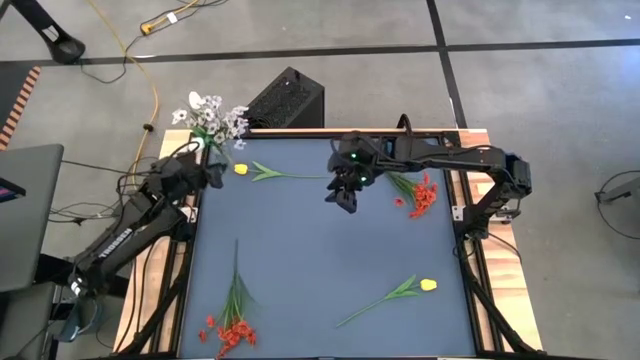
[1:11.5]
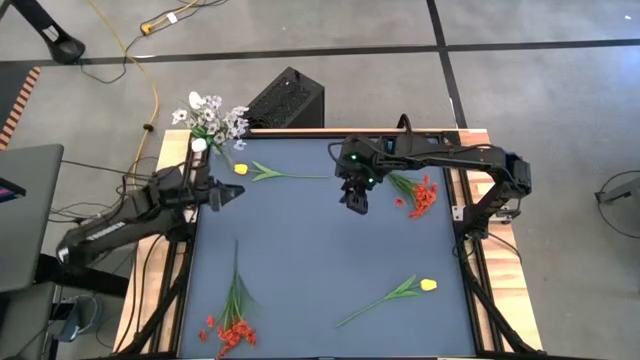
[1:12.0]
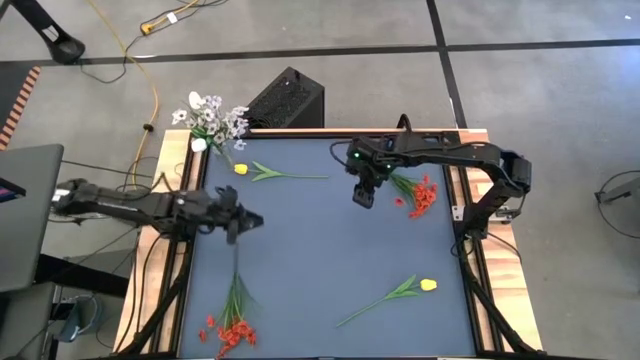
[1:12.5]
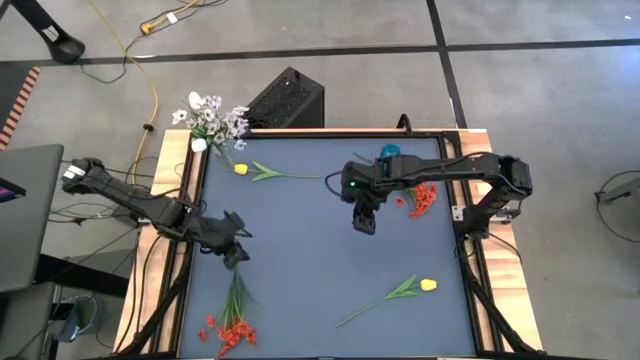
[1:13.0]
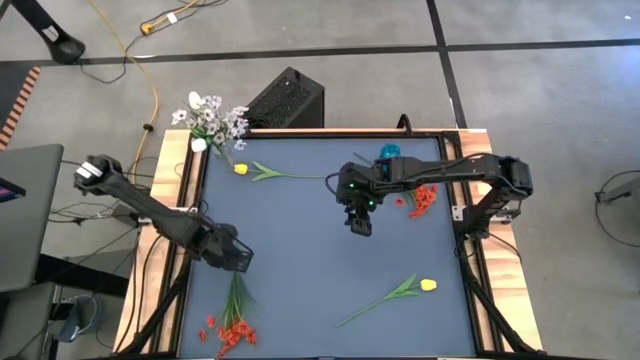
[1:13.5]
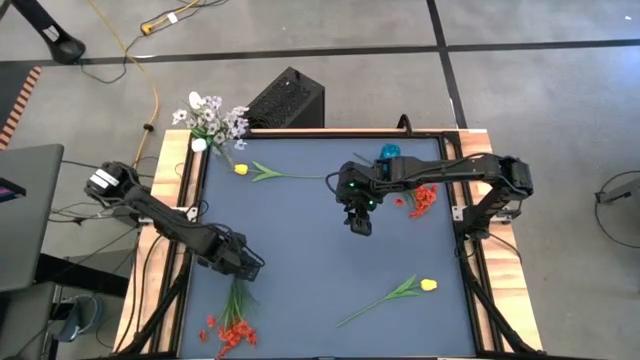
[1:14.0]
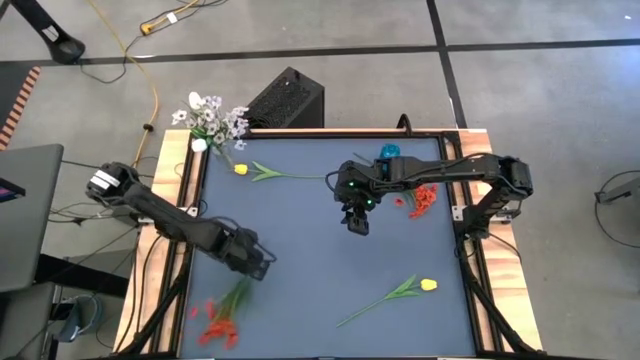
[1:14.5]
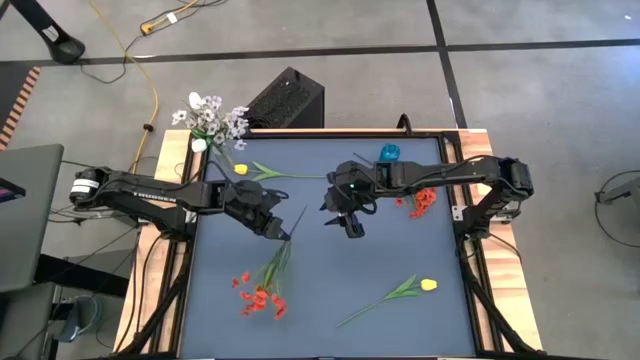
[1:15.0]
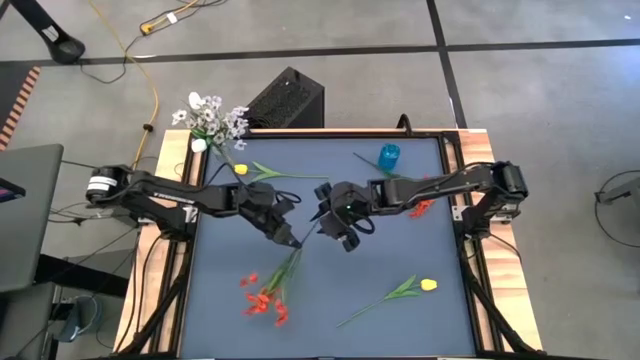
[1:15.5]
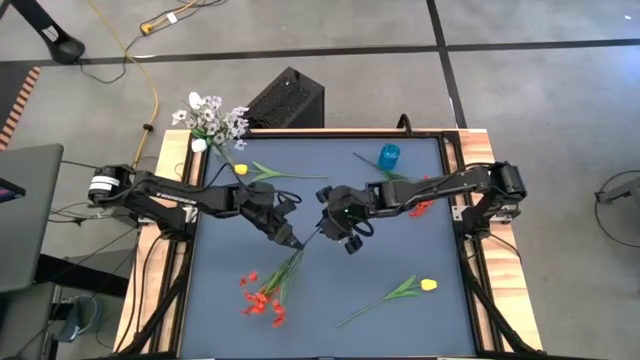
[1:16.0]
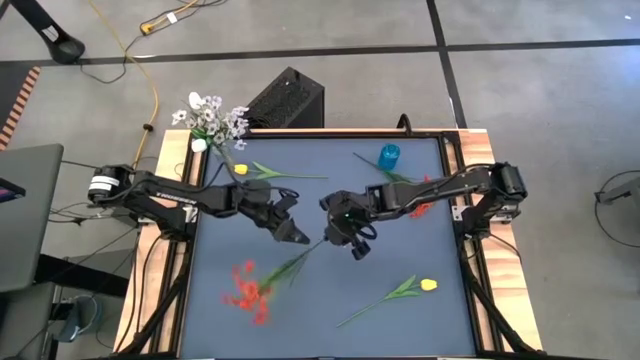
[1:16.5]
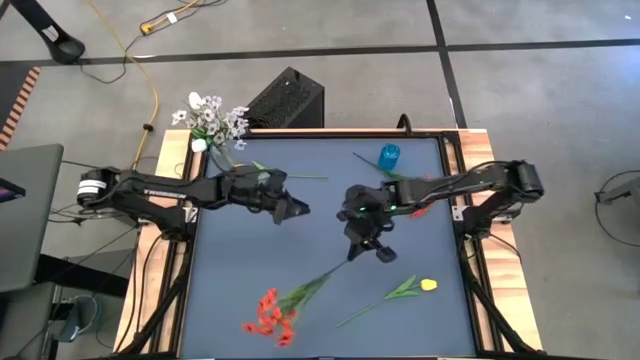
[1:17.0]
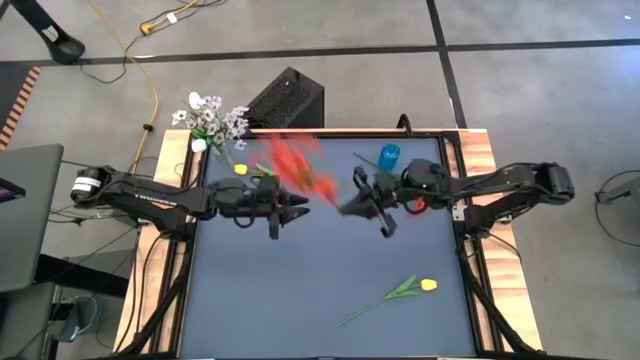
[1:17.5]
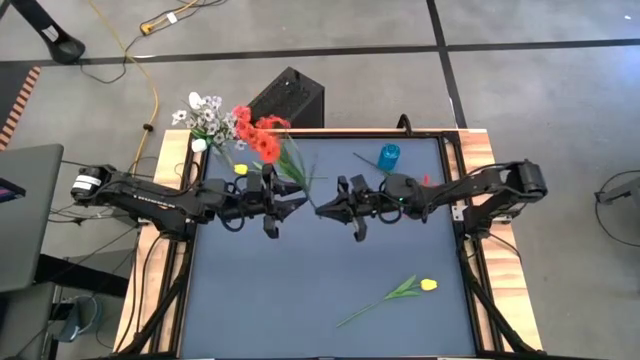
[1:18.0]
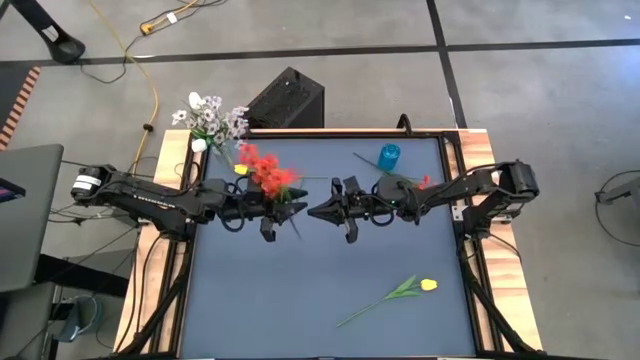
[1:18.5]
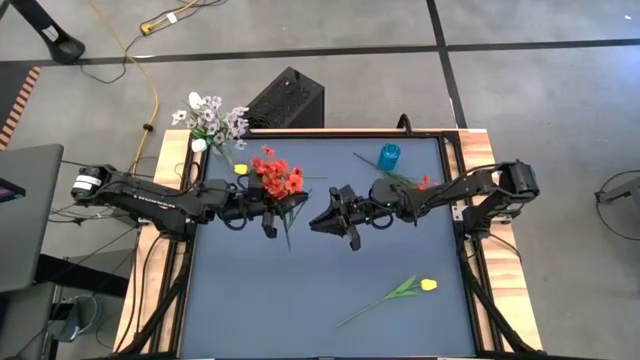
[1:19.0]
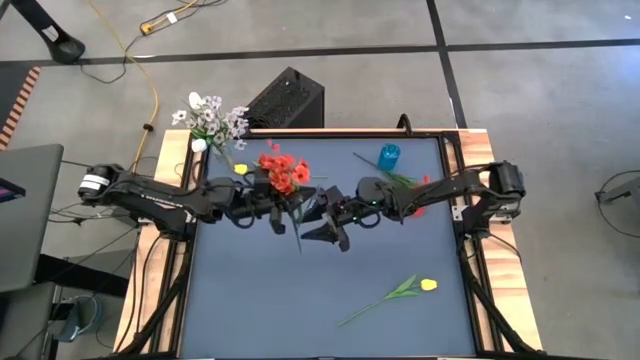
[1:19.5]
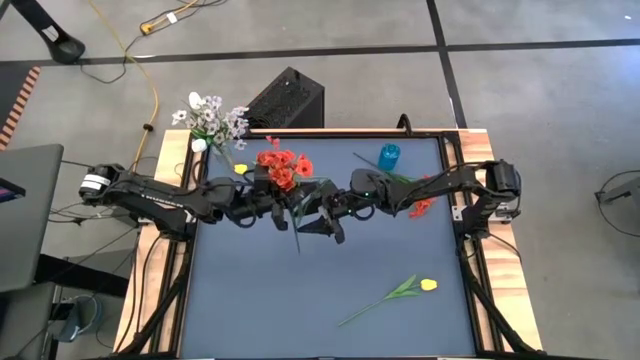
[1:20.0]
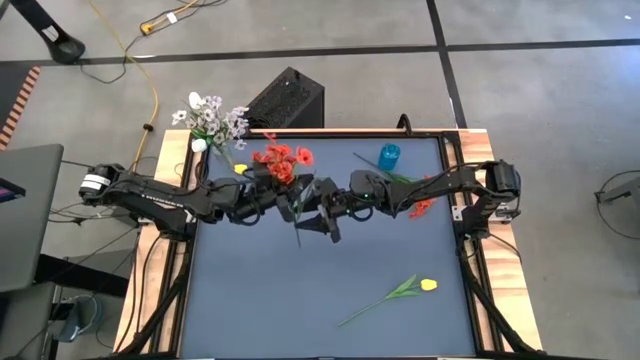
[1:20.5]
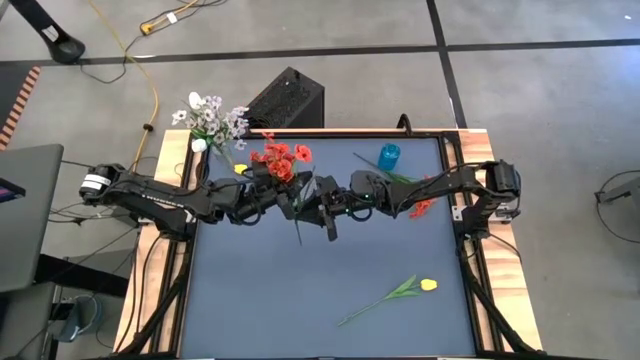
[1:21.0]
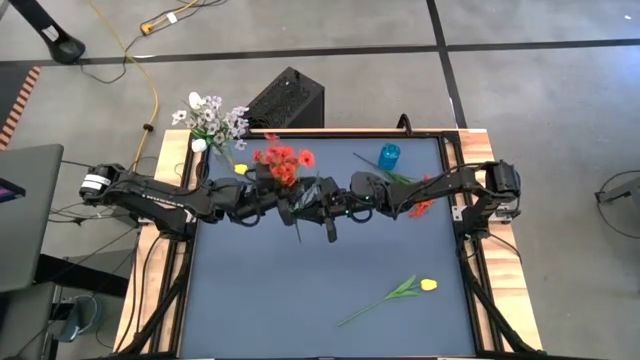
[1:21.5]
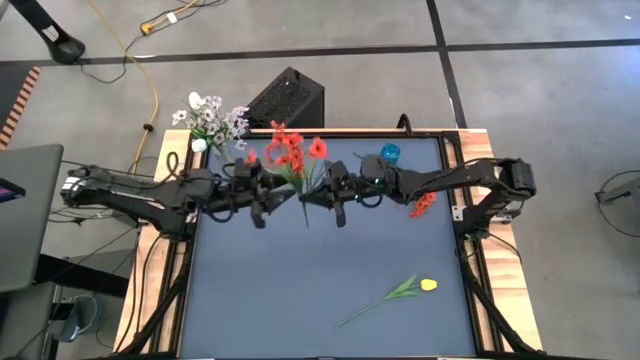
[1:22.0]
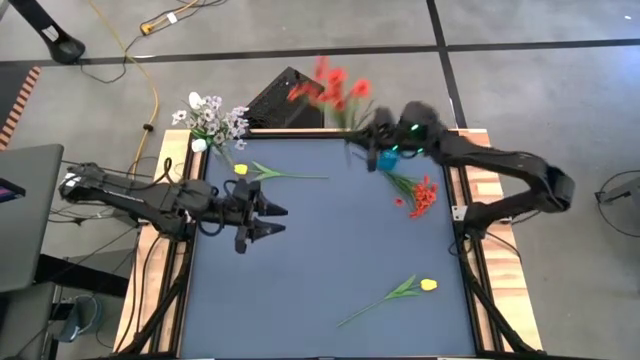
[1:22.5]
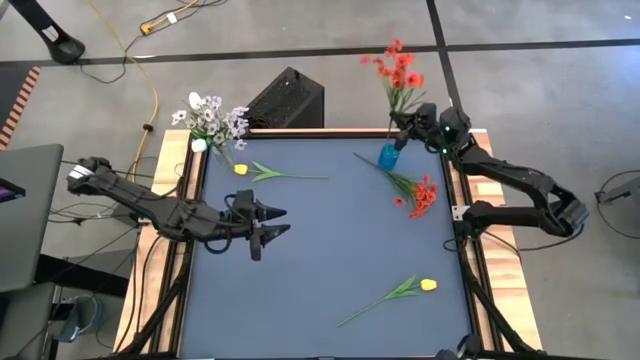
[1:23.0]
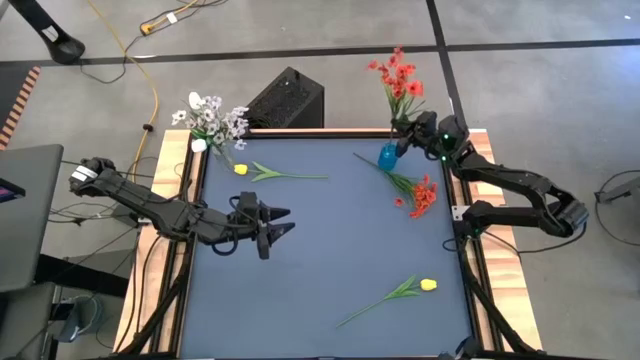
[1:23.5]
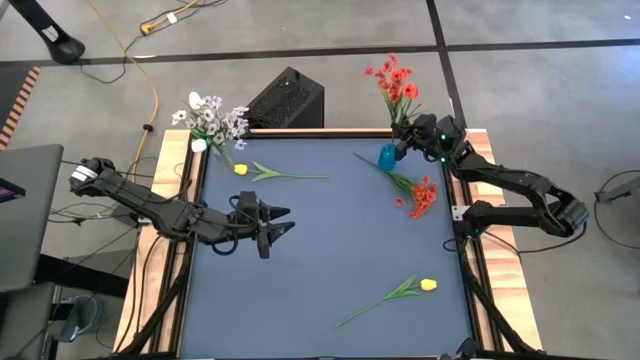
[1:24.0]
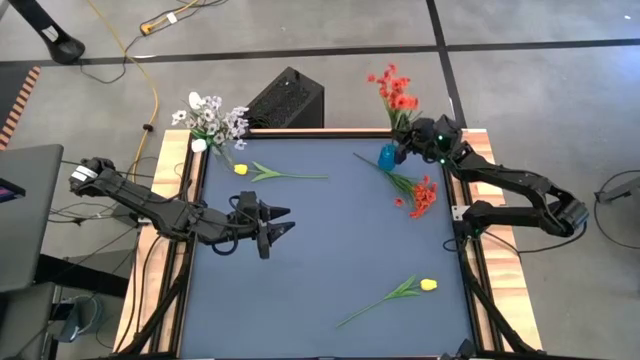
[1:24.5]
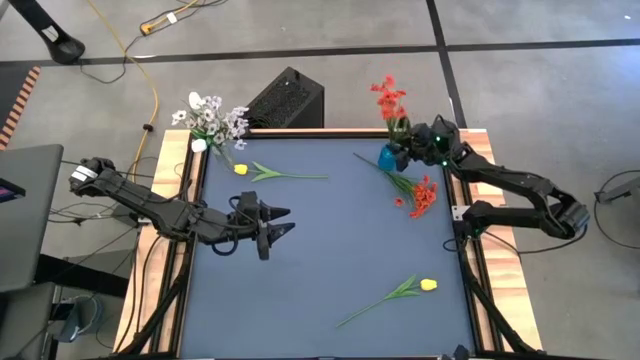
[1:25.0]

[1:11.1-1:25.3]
Task: Sort flowers into vase by color
Put the bottom orange flower into the blue vase

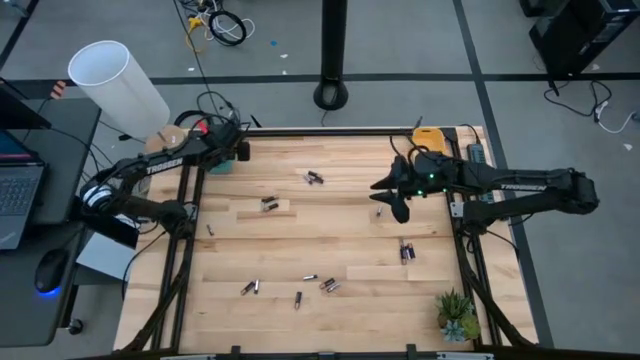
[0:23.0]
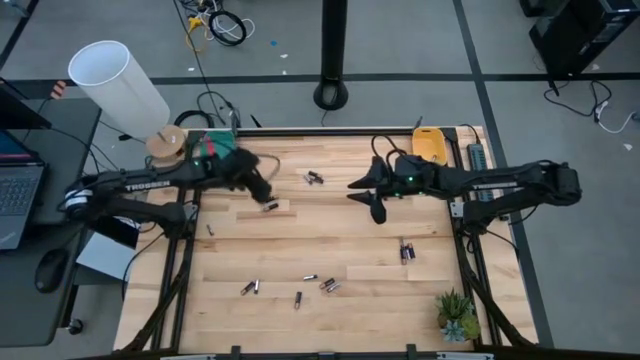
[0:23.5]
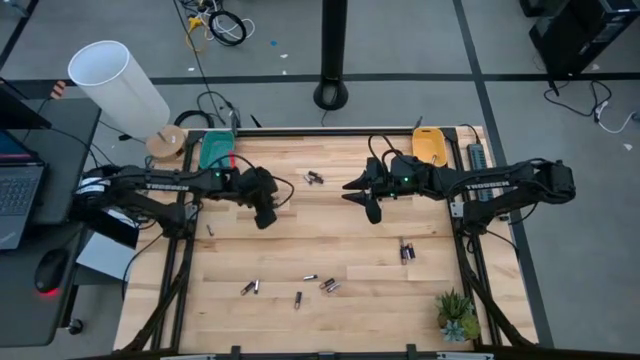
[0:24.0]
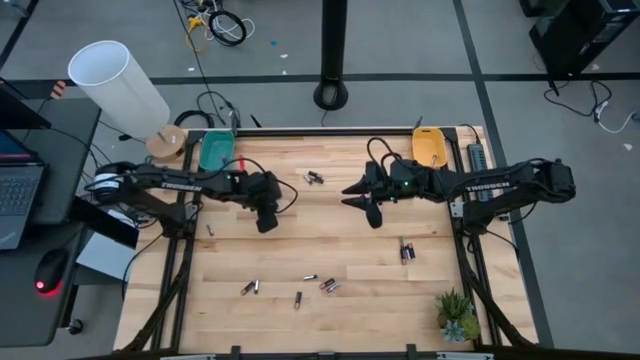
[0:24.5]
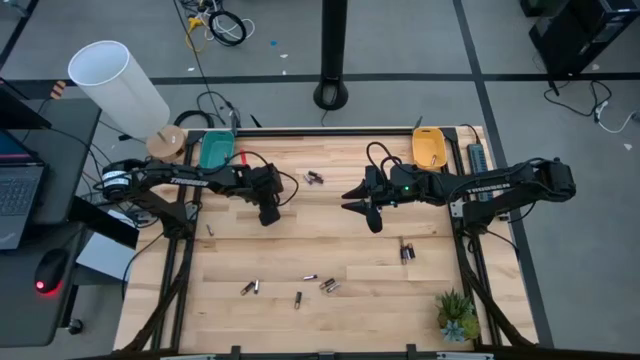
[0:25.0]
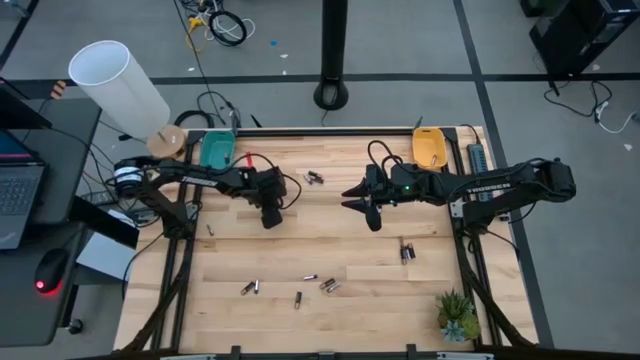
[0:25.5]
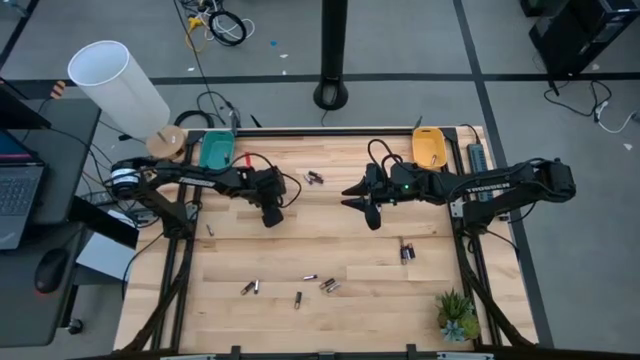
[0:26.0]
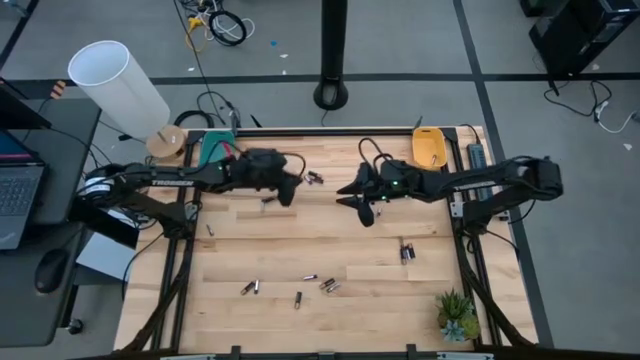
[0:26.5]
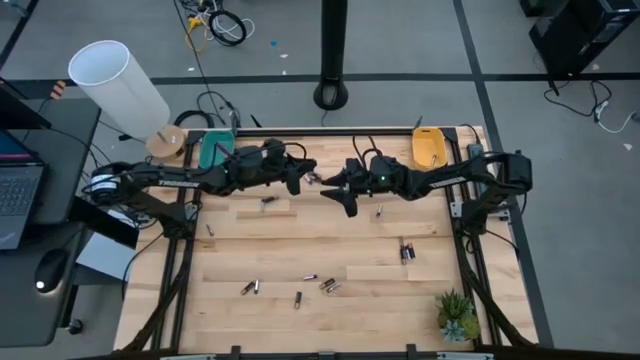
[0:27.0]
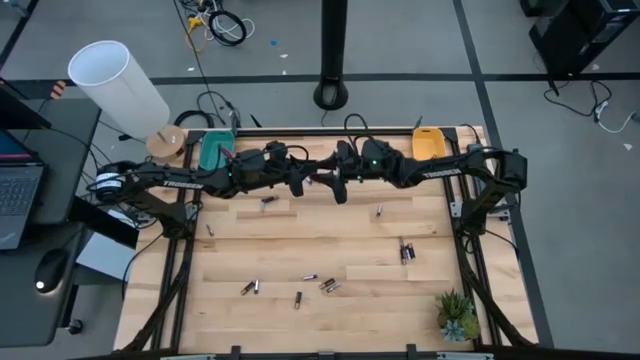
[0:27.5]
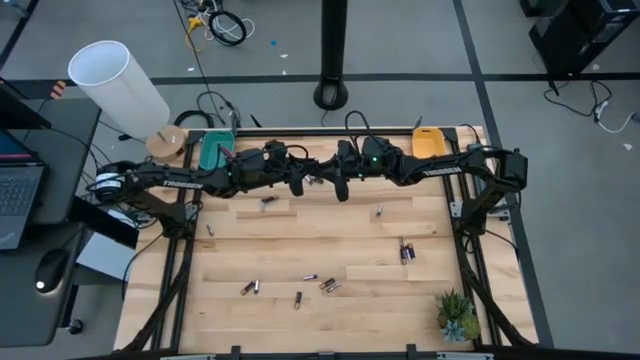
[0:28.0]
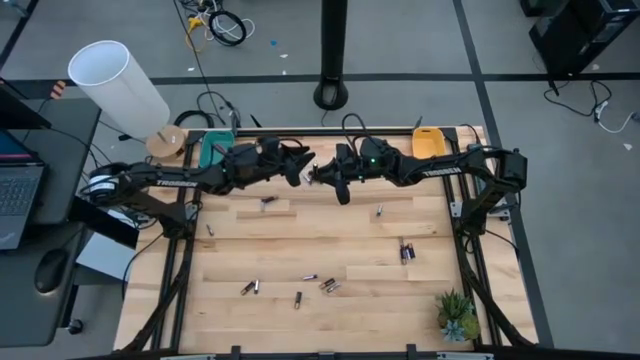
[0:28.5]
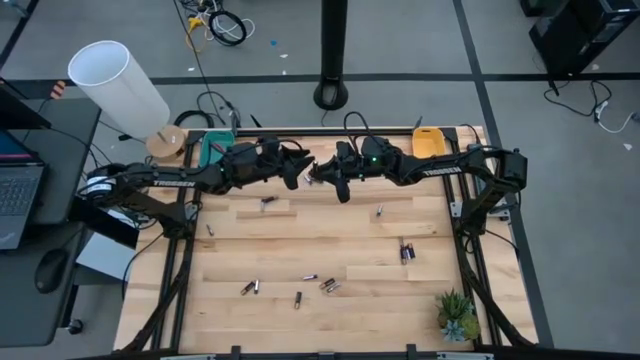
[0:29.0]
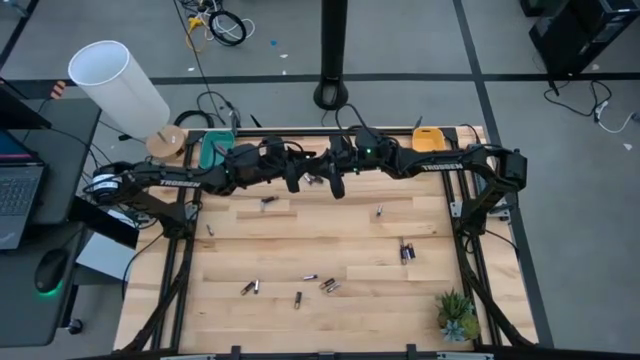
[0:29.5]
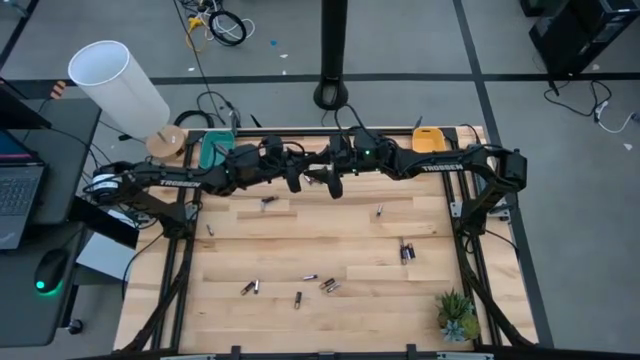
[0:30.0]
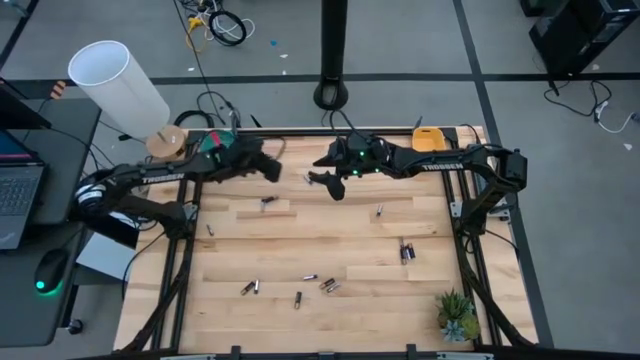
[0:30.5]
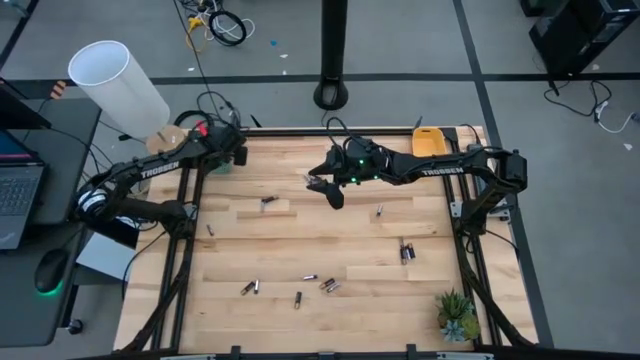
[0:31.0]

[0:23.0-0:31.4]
Task: Sort batteries
Put the black battery into the blue bin
